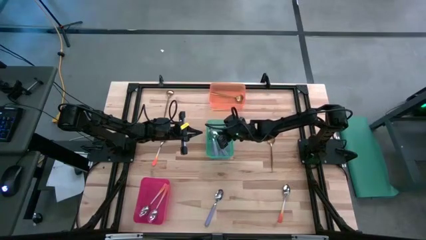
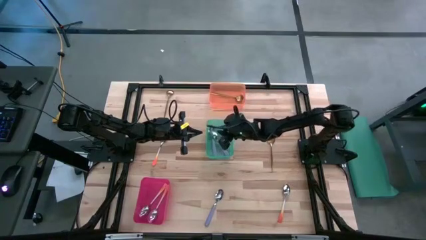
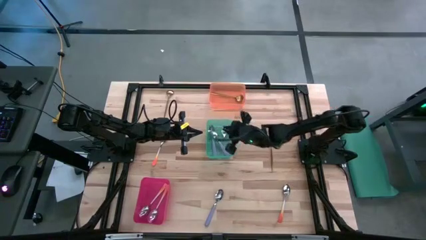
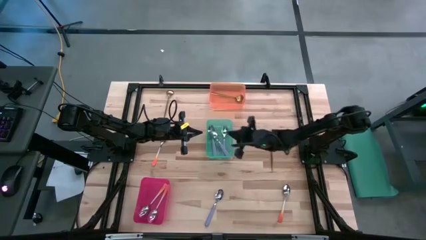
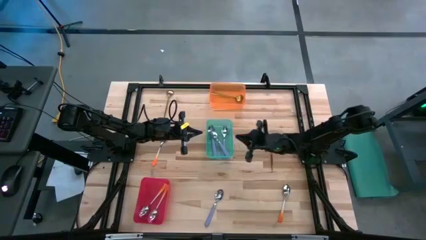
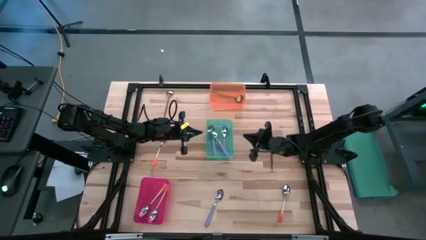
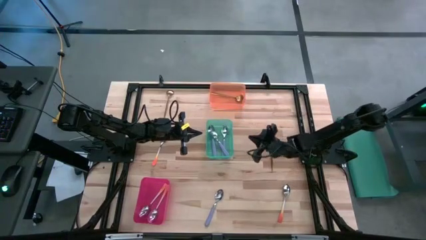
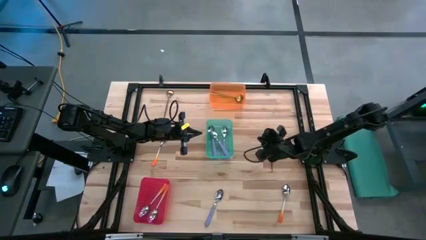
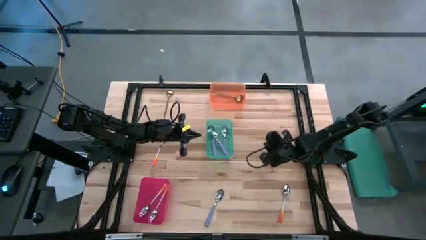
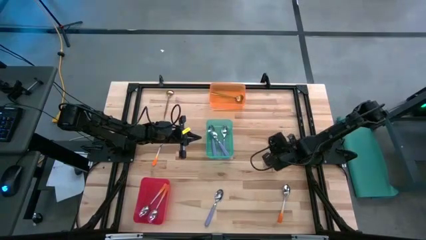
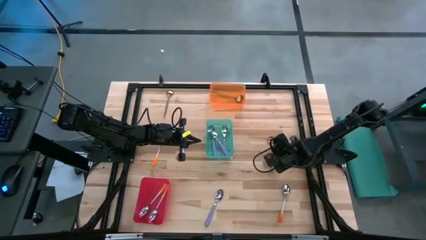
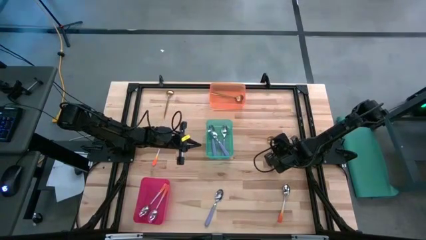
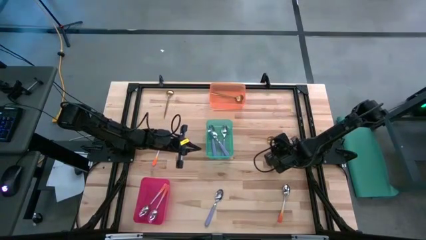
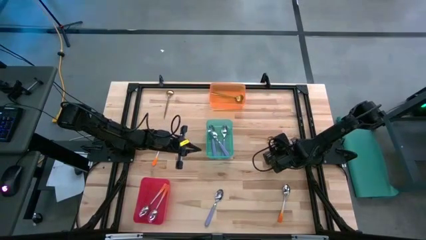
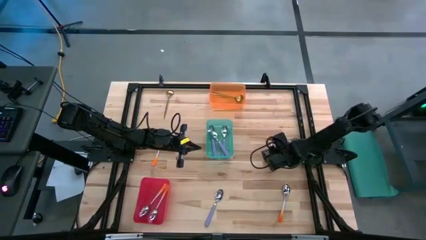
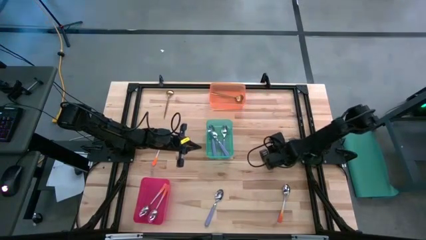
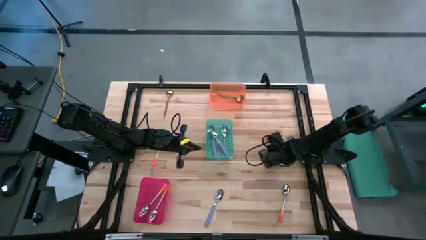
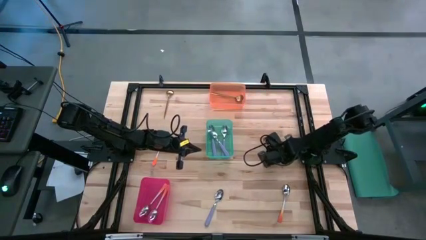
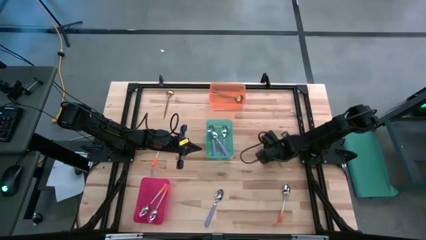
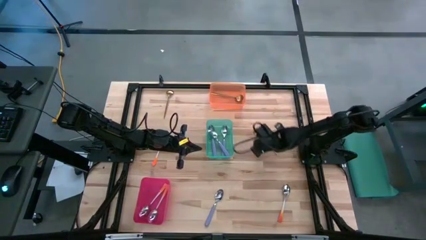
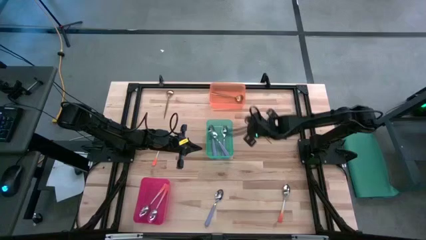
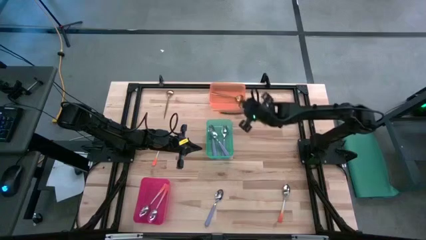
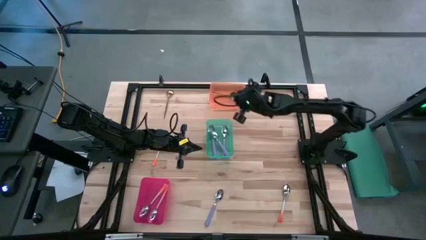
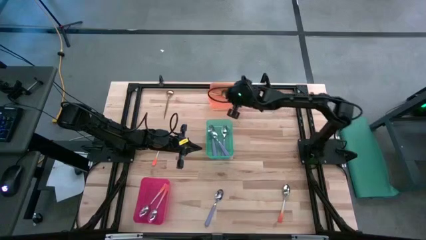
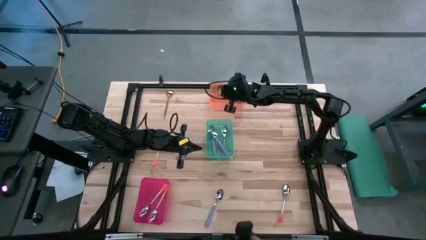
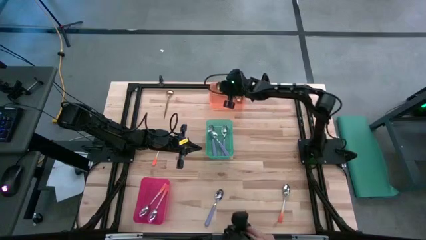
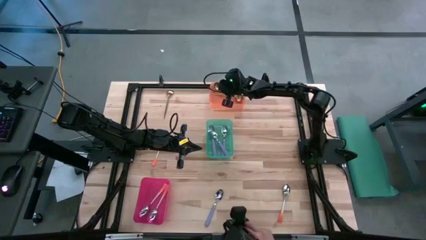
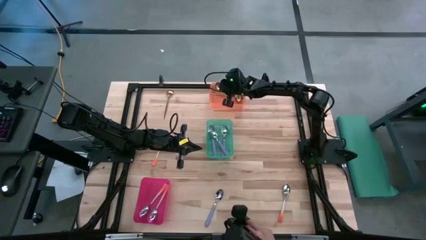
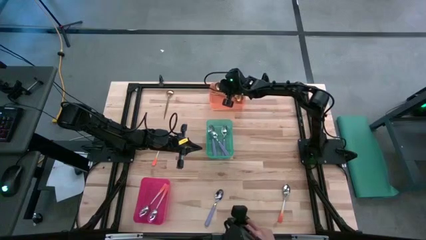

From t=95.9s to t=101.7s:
Task: Sort silverware by color (type)
Put the gold spoon into the orange bin

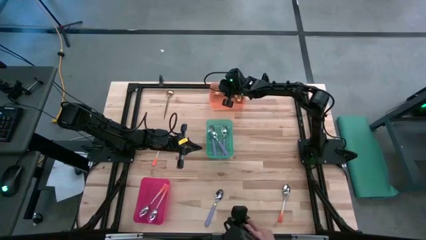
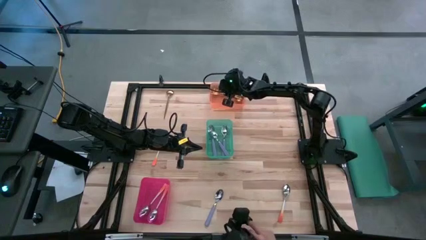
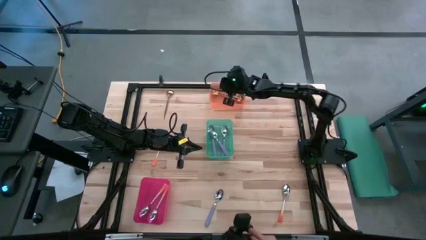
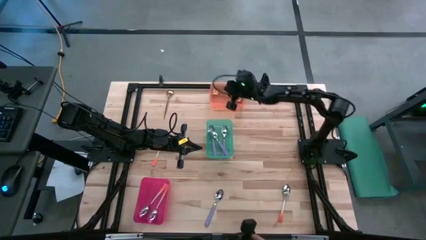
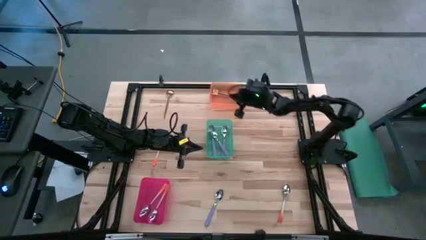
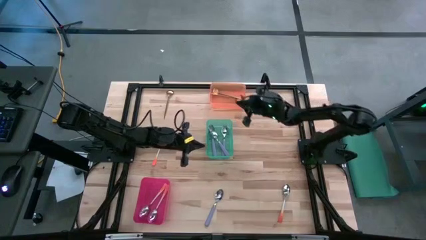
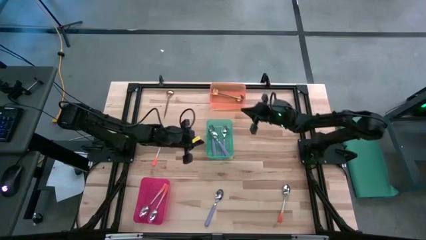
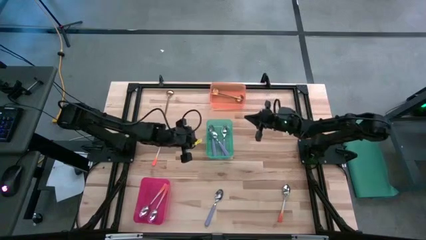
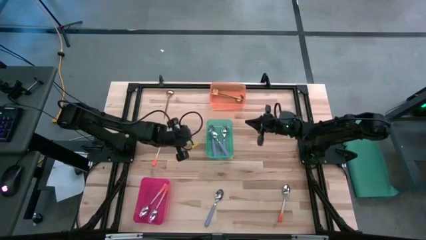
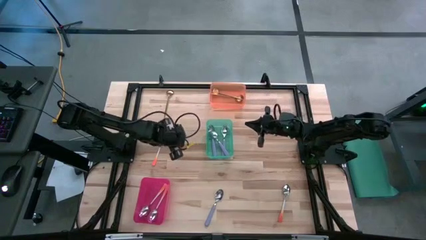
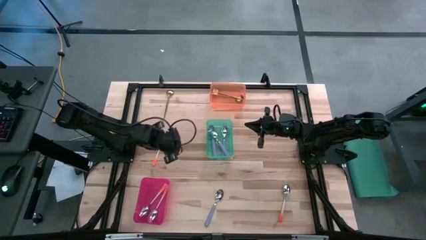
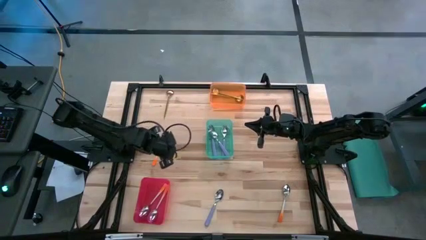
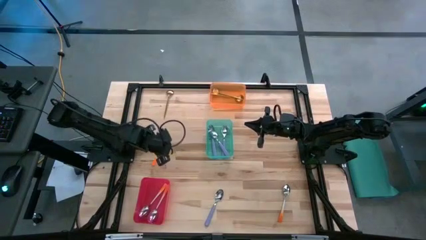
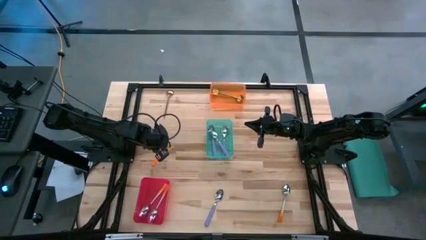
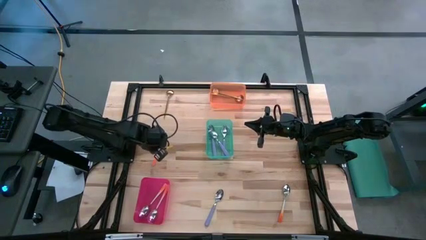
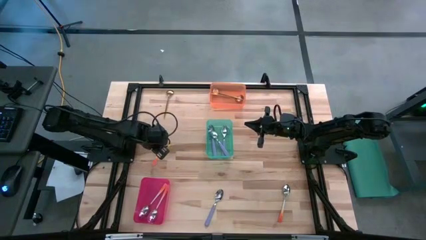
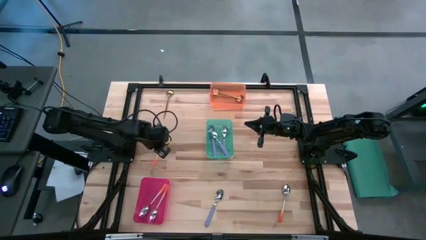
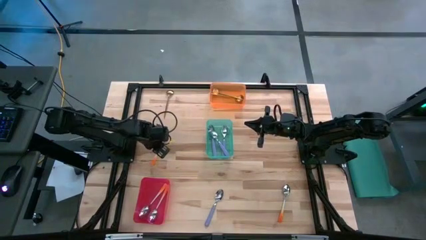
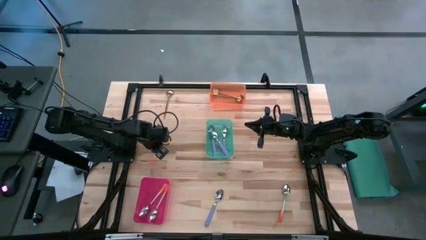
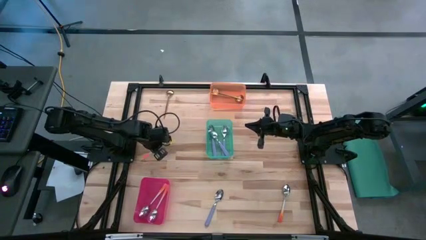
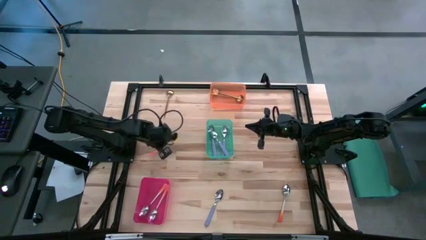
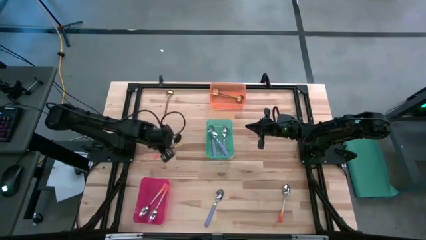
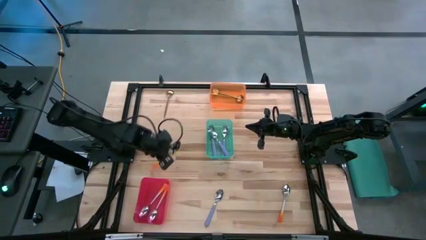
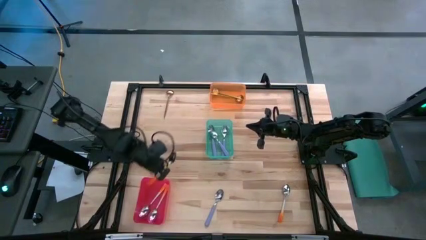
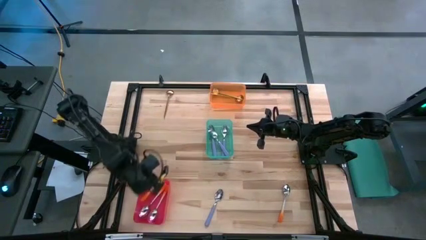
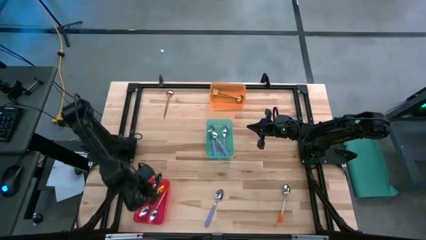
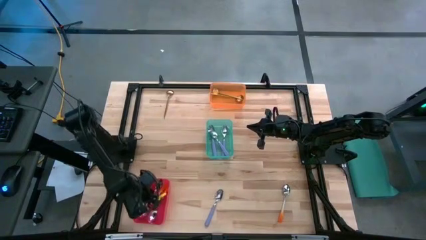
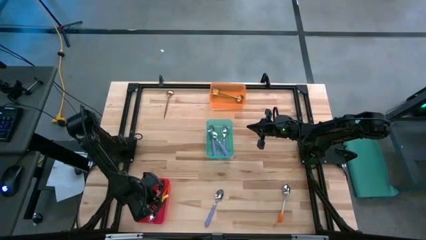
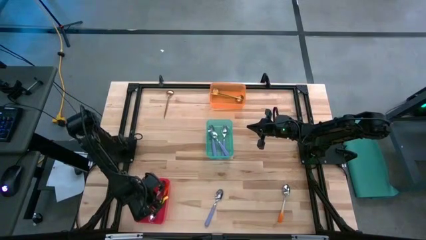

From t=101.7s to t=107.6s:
Put the orange spoon into the red bin

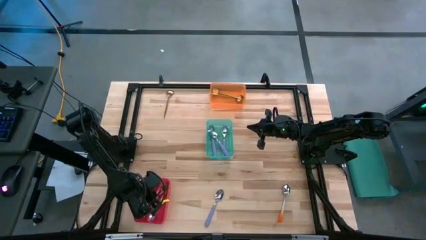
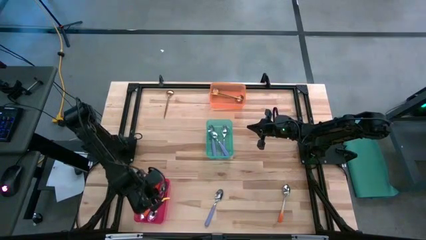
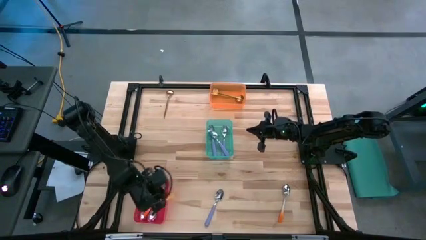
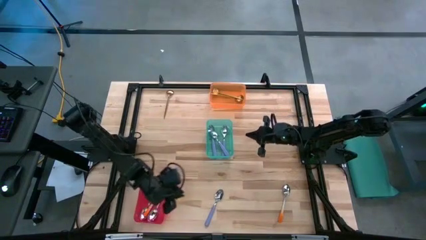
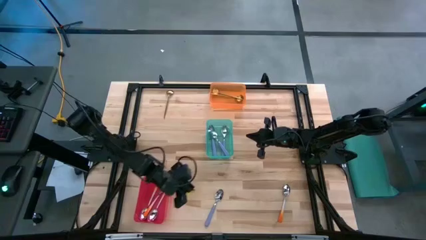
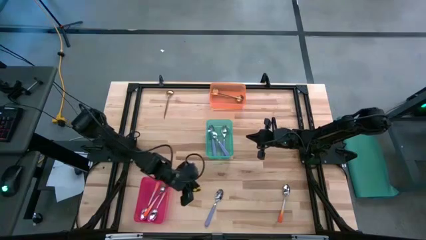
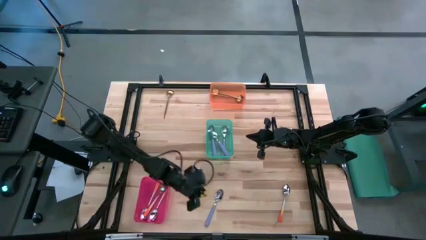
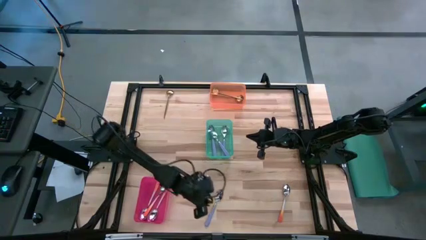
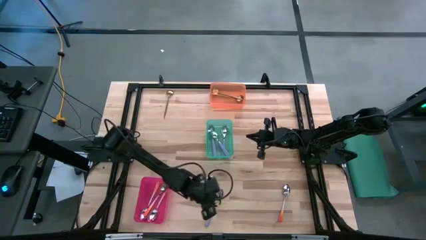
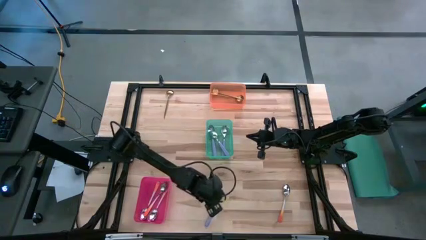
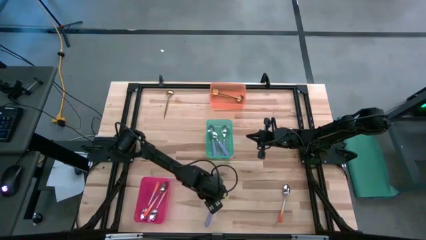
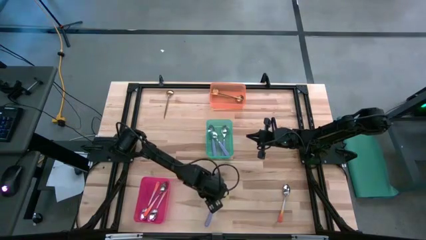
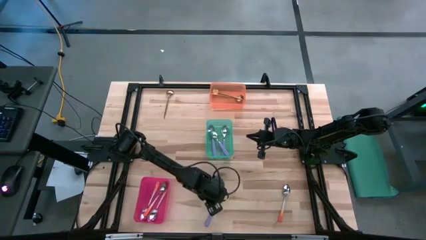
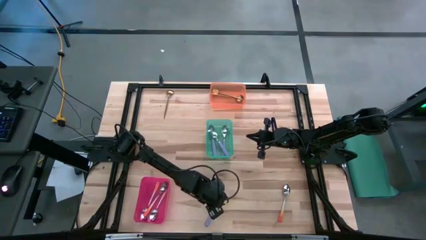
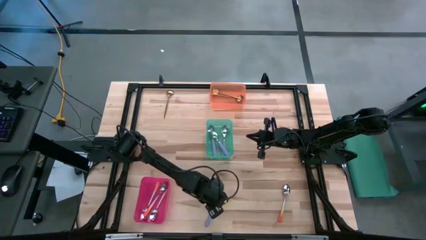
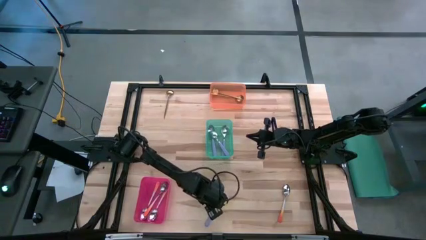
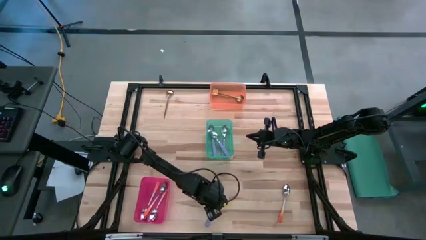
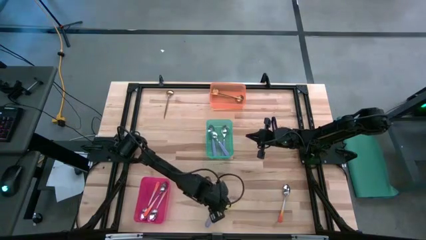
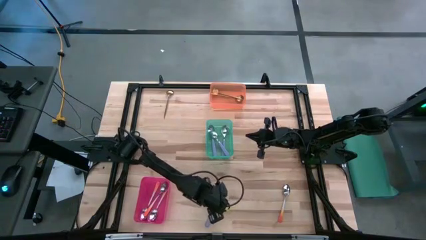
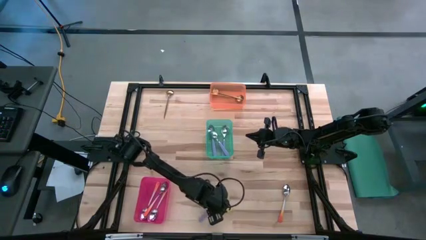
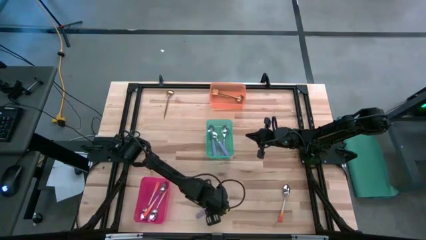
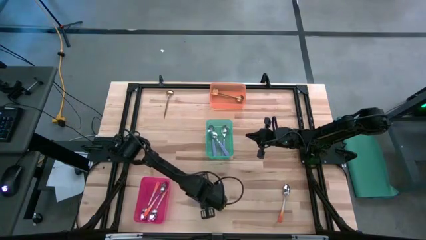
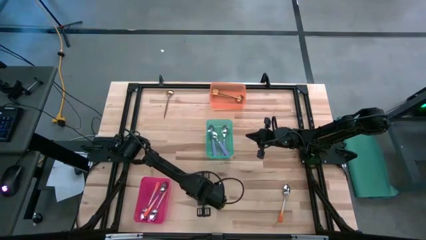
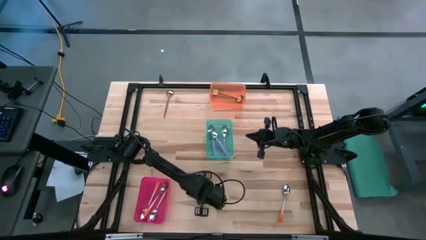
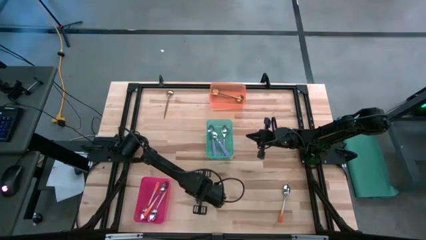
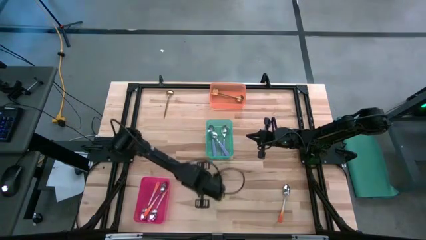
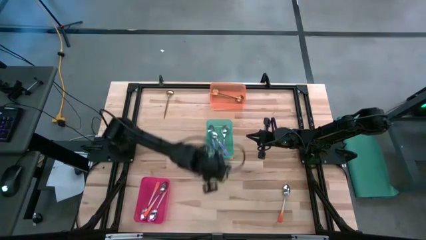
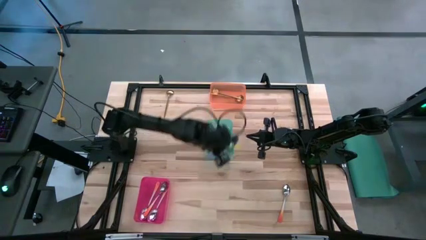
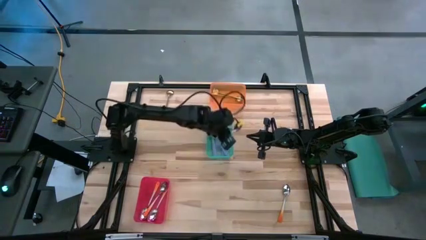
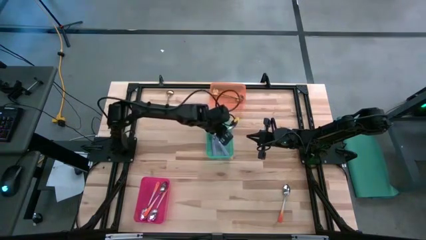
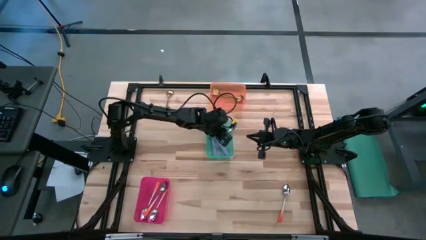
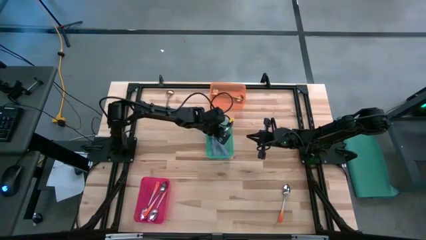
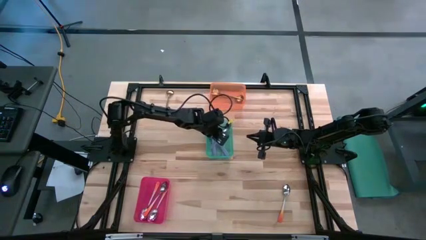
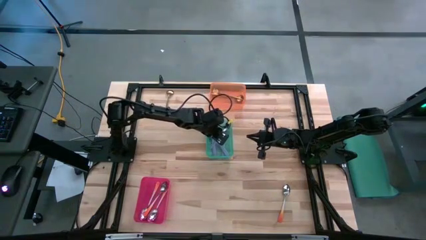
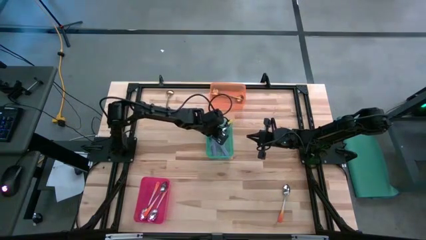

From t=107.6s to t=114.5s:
Put the purple spoon into the green bin
